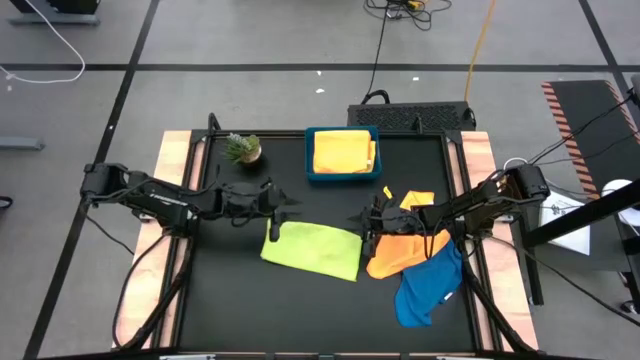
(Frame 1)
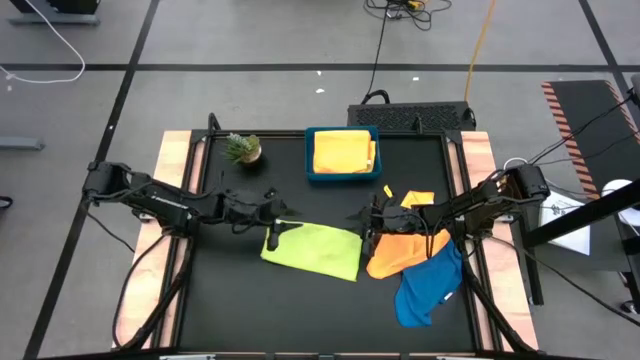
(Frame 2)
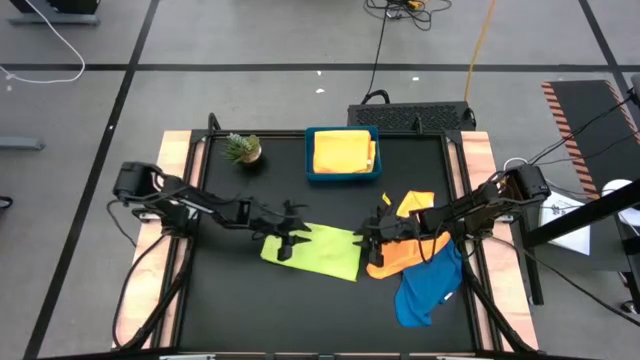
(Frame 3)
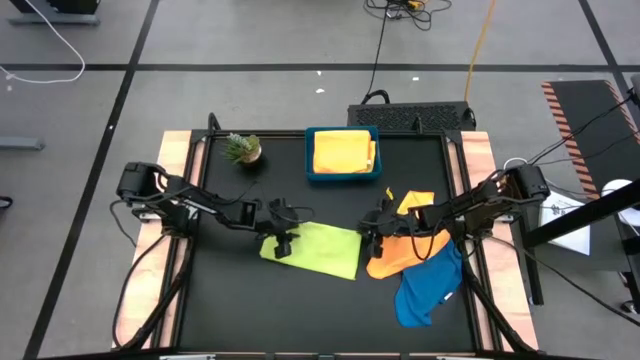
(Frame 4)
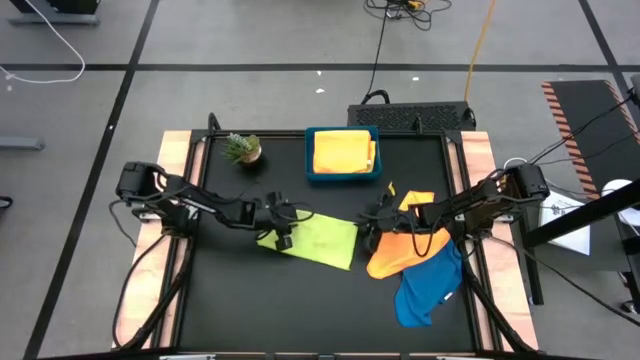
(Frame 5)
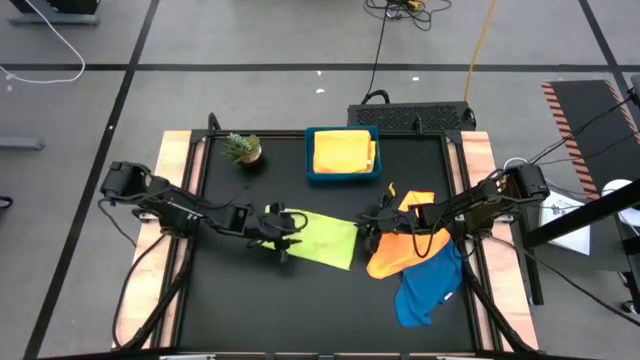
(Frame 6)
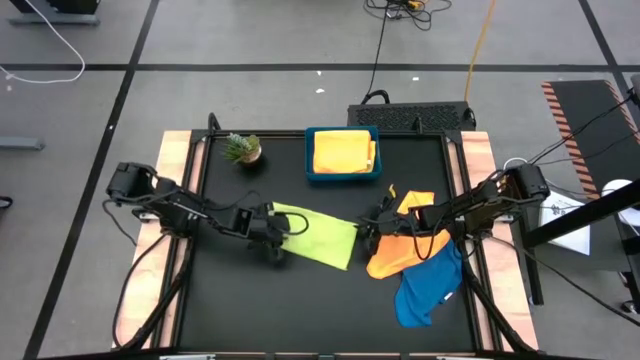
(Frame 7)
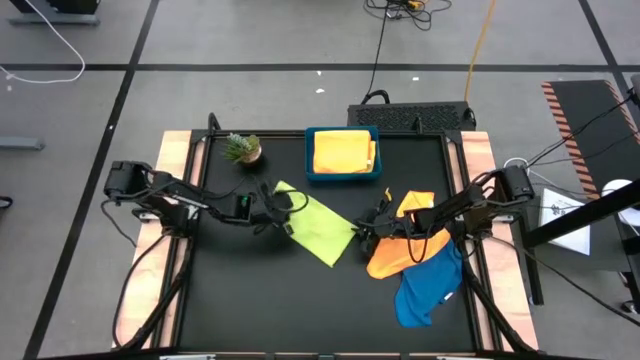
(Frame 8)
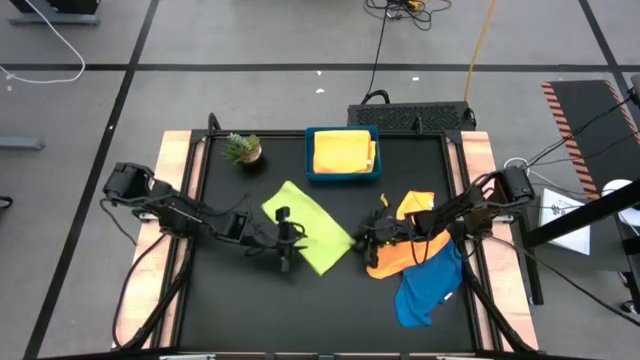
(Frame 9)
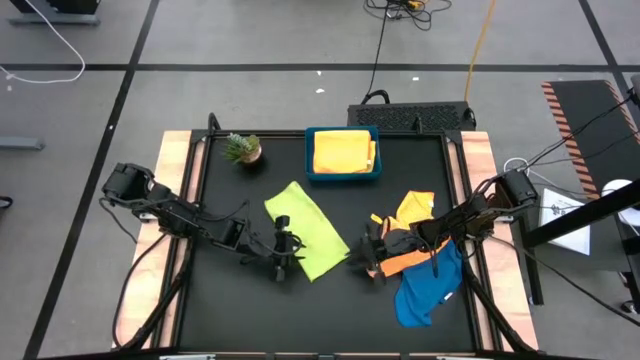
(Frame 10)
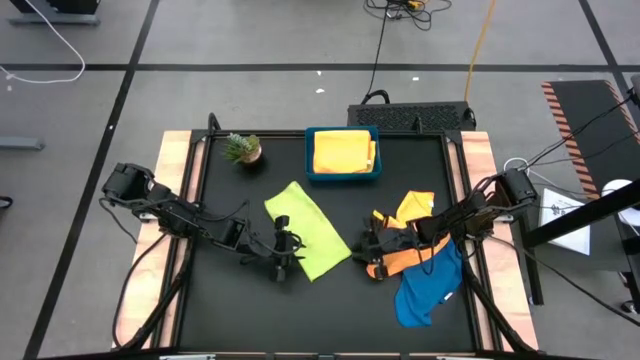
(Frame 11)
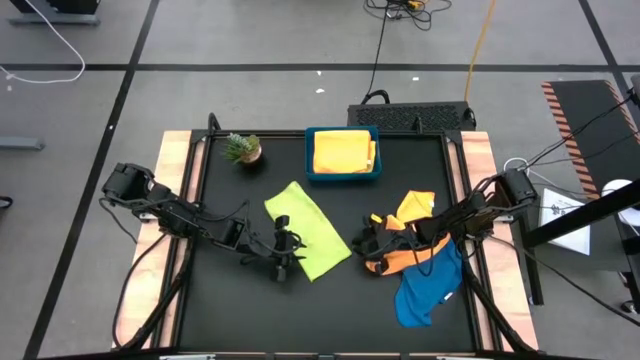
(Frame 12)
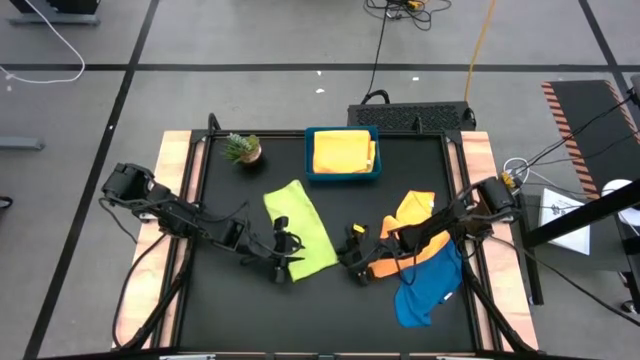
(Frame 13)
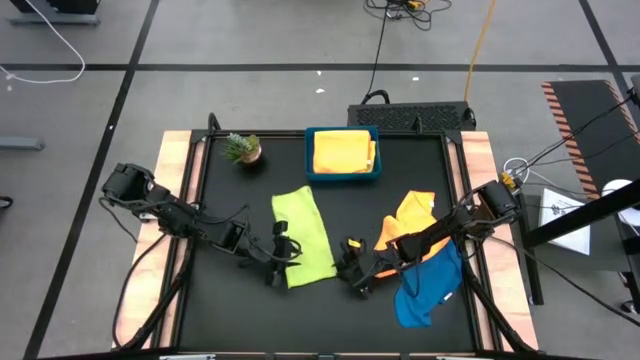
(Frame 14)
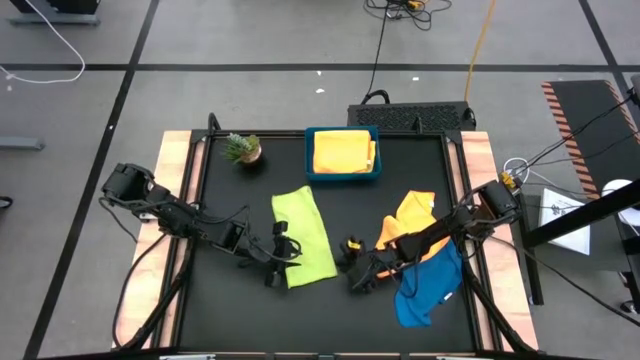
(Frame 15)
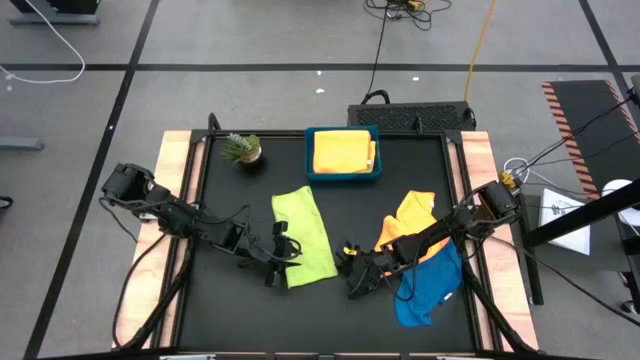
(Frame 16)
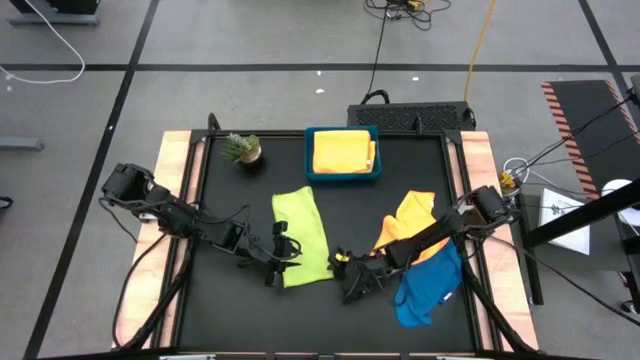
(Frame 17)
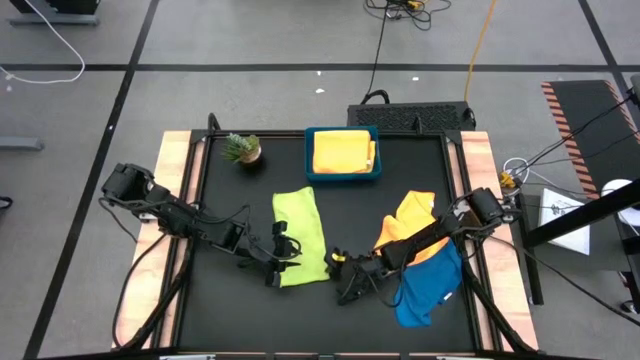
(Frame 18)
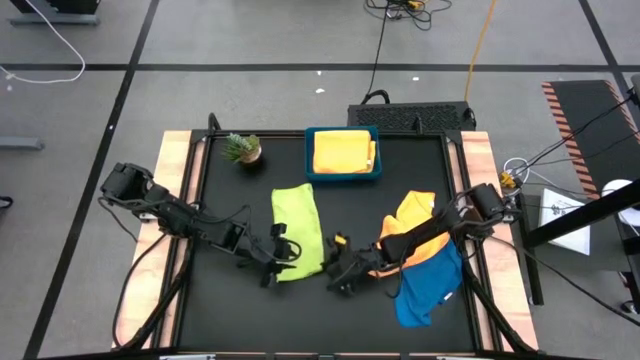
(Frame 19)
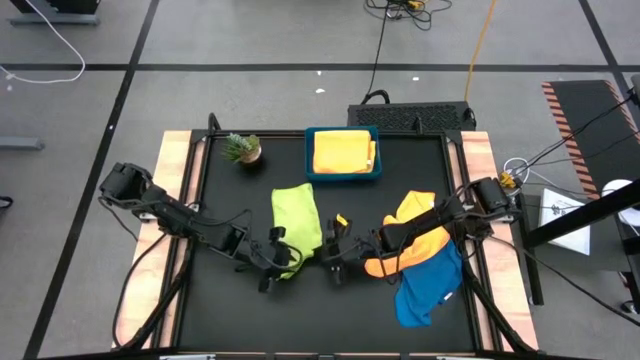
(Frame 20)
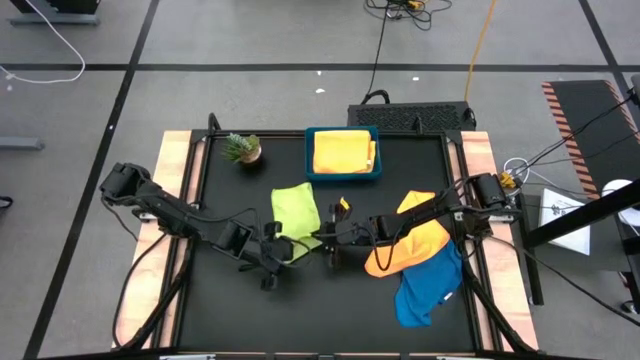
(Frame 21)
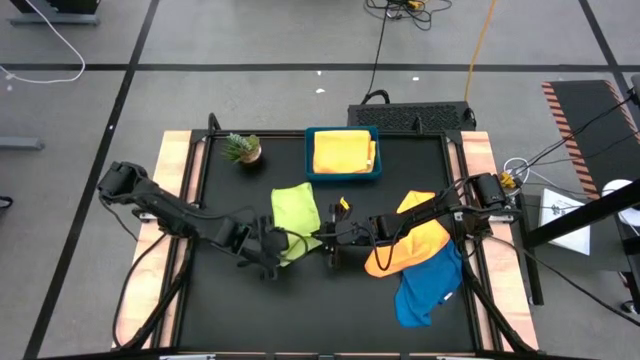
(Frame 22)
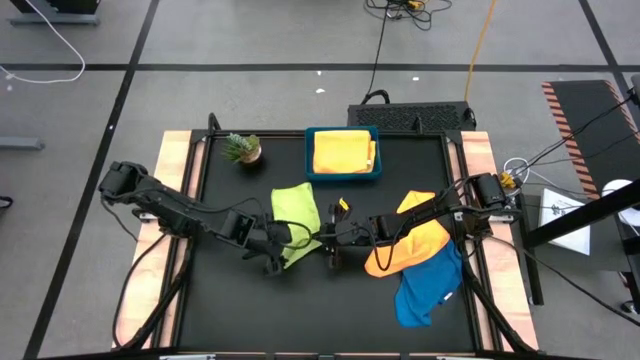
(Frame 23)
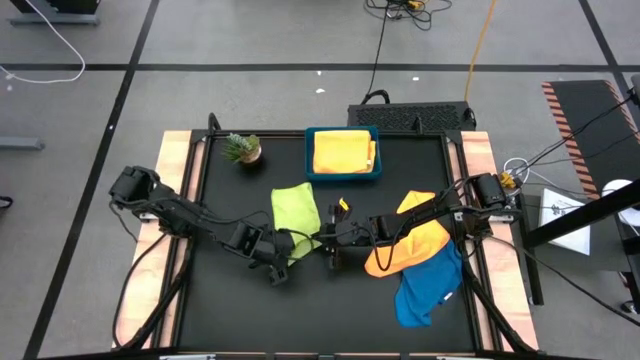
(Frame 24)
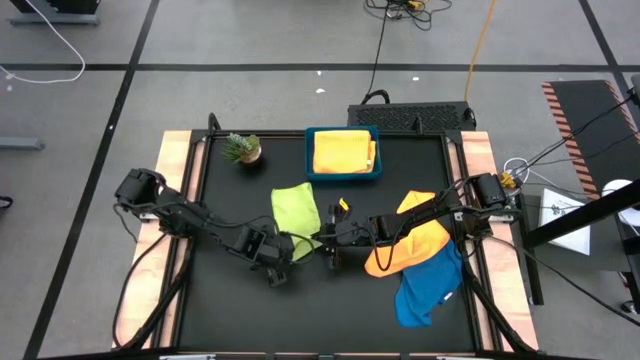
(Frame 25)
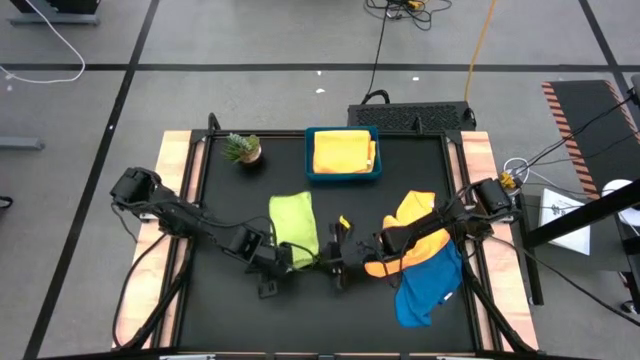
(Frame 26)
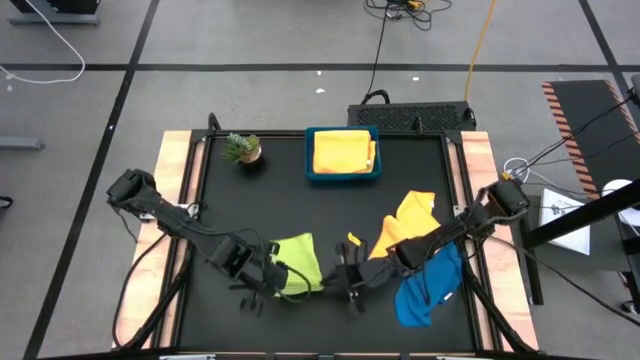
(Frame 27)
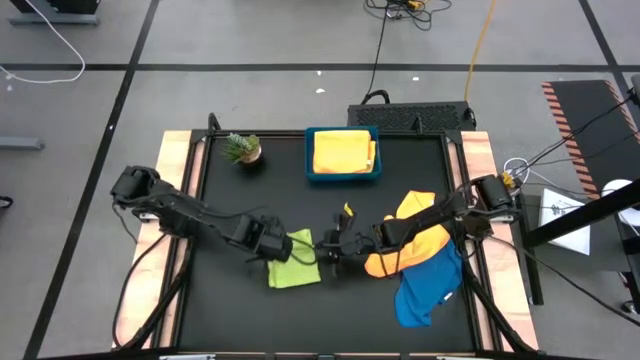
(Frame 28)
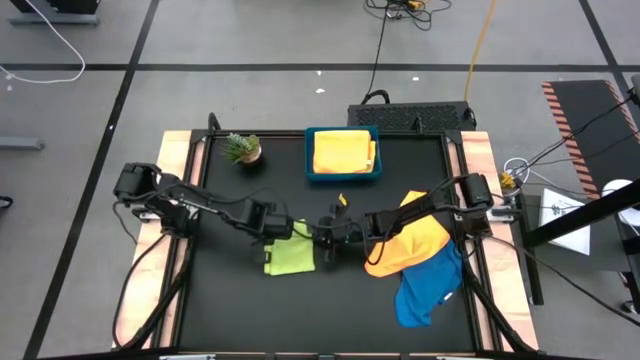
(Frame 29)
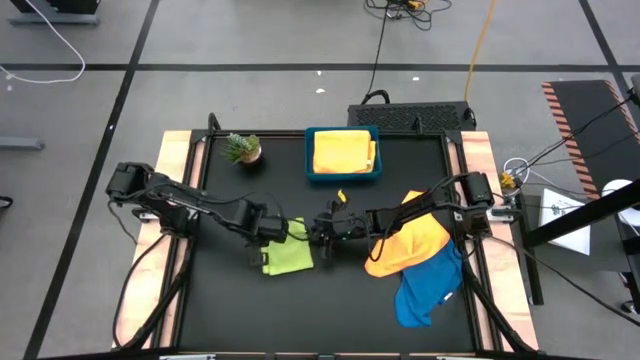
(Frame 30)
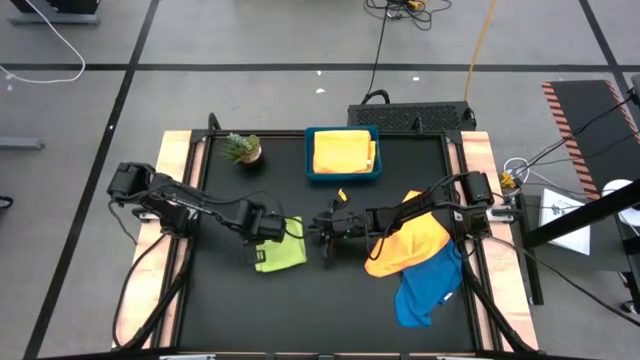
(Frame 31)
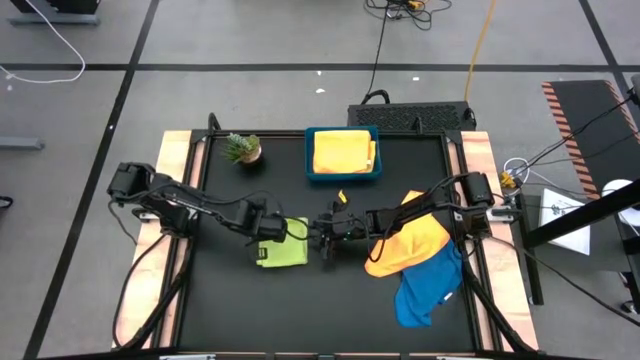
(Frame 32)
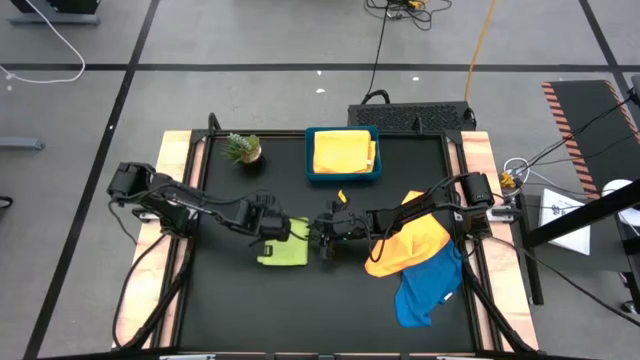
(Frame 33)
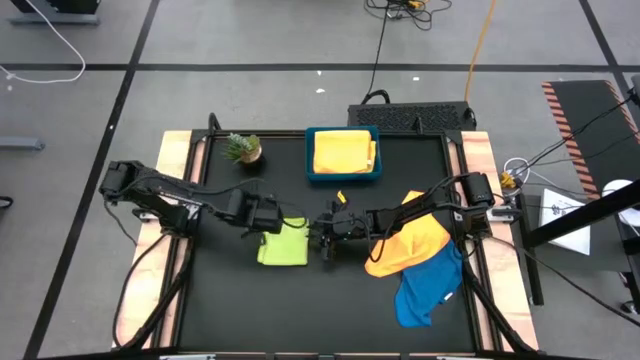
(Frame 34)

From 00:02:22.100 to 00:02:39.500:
Task: Fold microfiber towels
Fold the green microfiber cloth

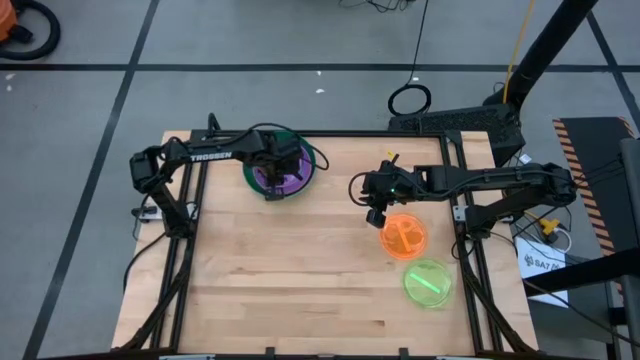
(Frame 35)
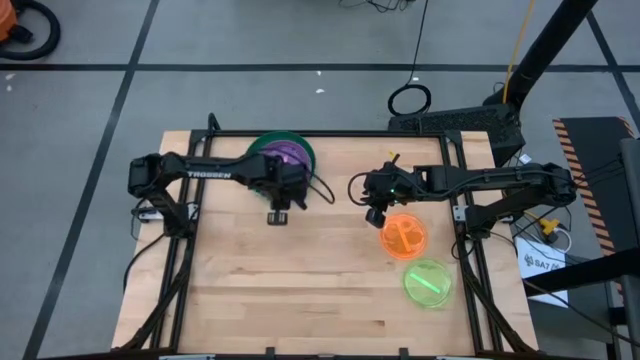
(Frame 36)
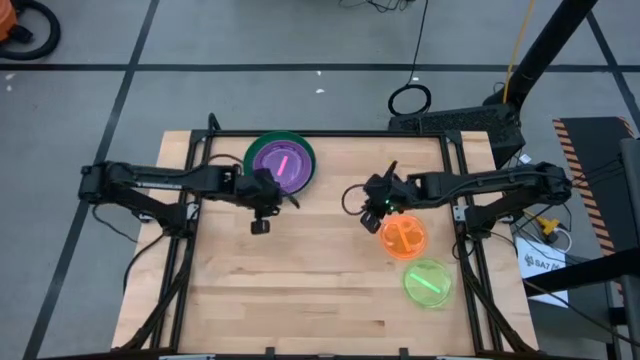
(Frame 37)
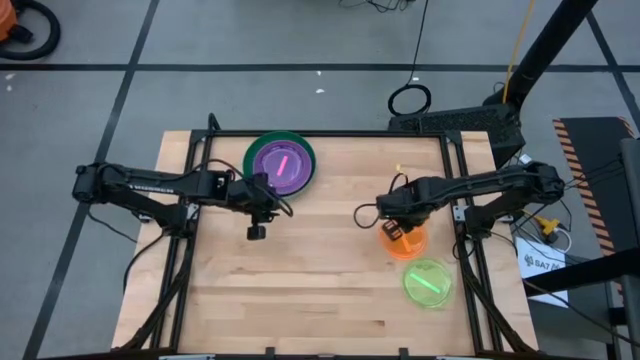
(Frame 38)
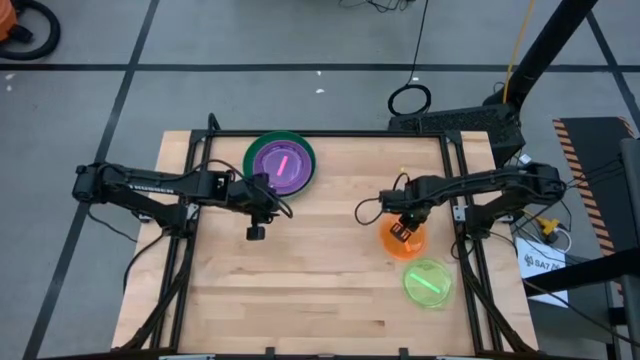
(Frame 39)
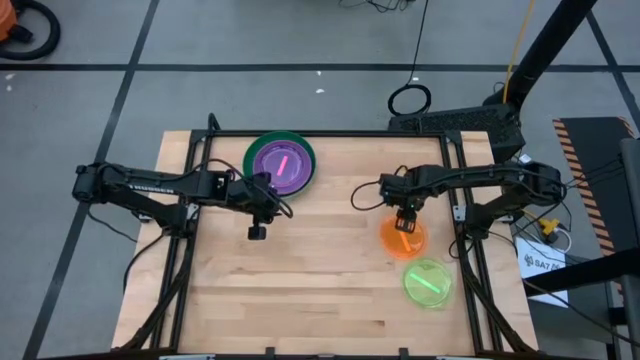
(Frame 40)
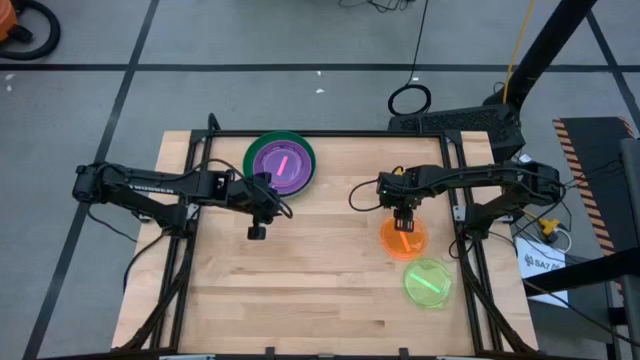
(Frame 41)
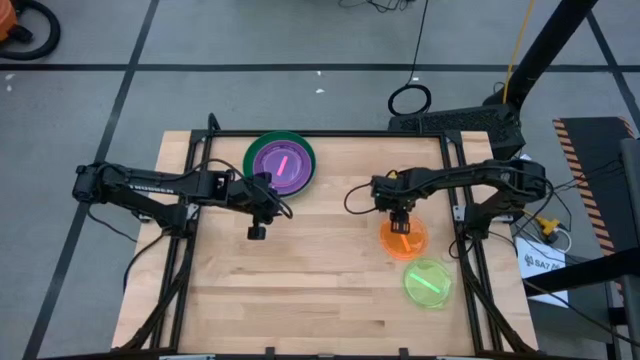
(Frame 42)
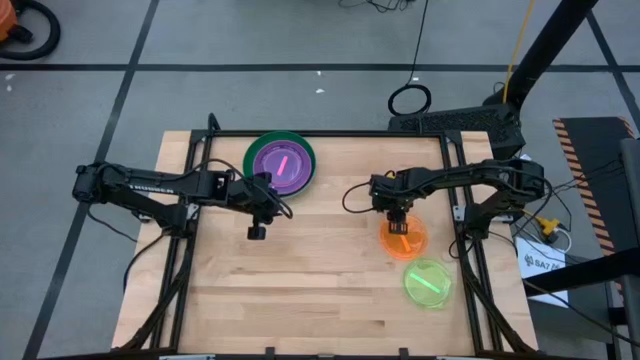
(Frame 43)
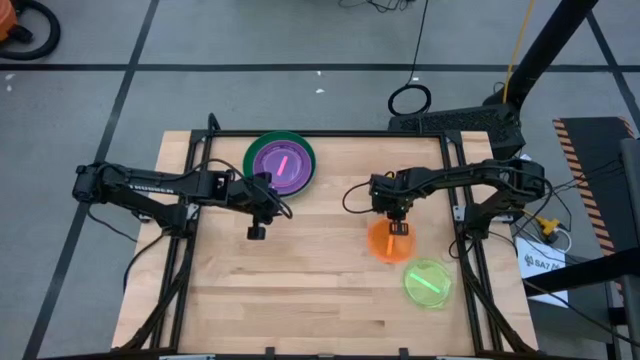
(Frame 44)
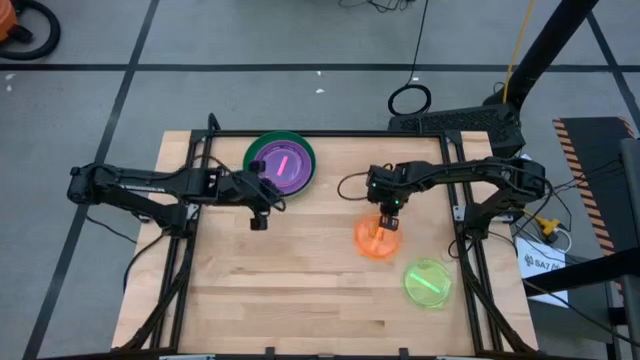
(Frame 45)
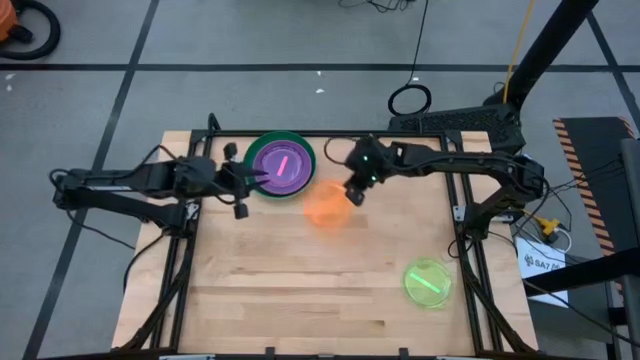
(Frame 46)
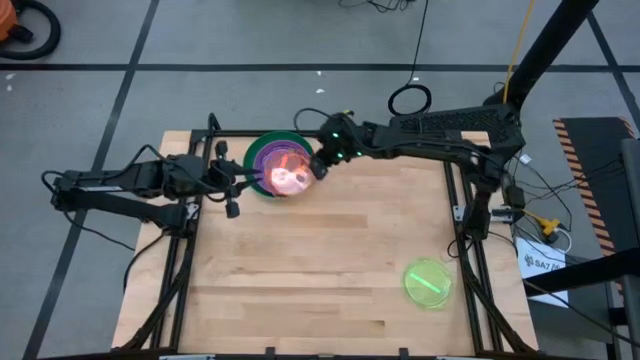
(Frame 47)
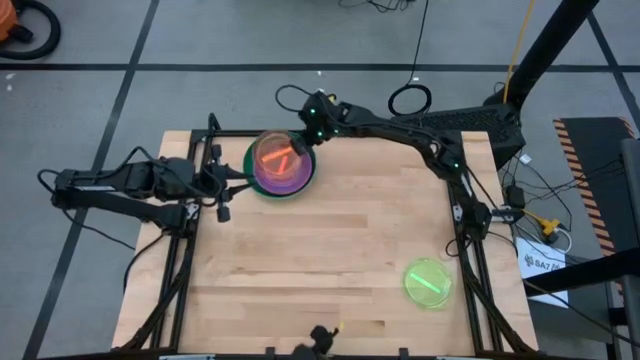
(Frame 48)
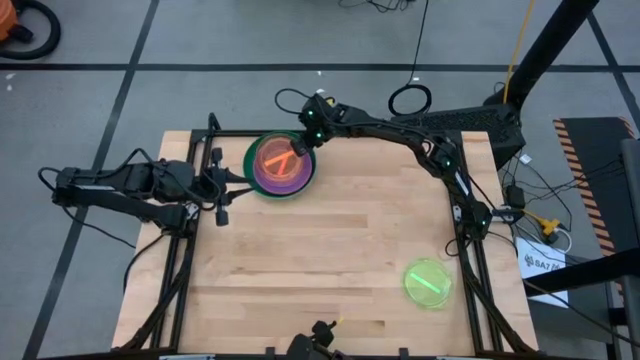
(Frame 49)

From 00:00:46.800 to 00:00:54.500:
Task: Stack plastic plates
Stack the orange plate on top of the pink plate
